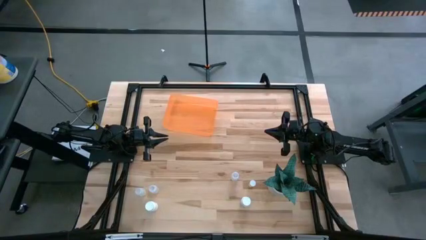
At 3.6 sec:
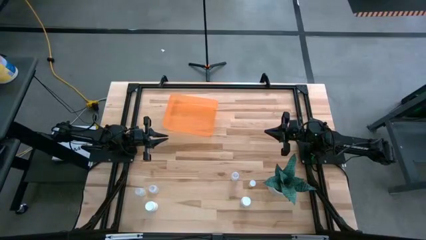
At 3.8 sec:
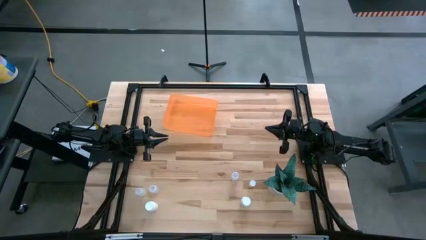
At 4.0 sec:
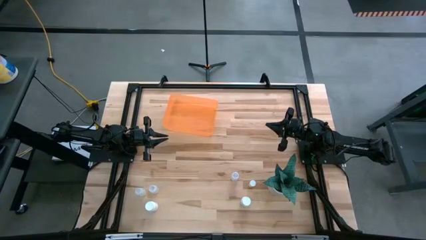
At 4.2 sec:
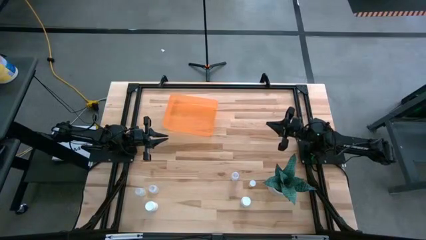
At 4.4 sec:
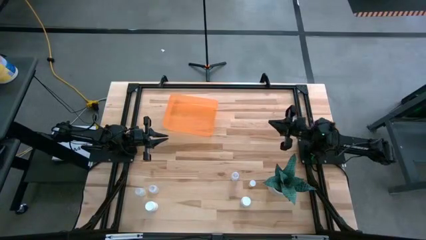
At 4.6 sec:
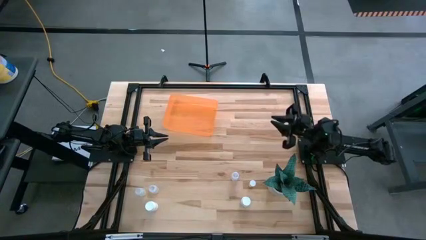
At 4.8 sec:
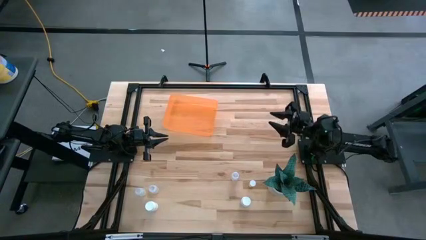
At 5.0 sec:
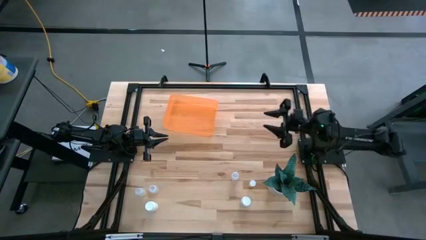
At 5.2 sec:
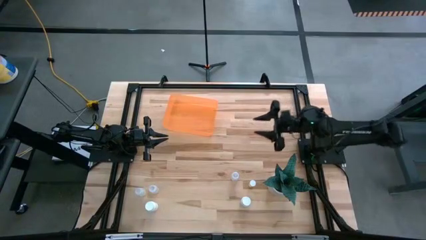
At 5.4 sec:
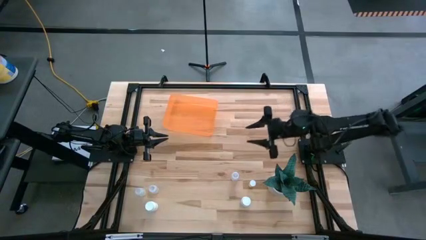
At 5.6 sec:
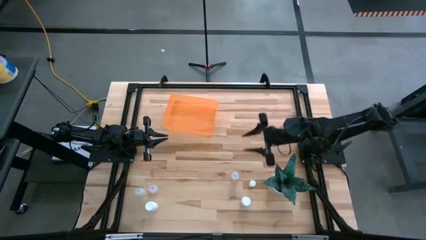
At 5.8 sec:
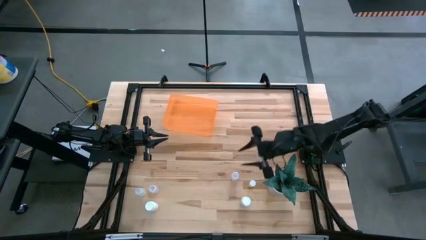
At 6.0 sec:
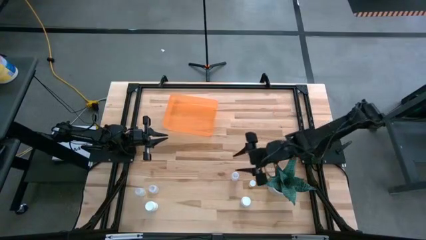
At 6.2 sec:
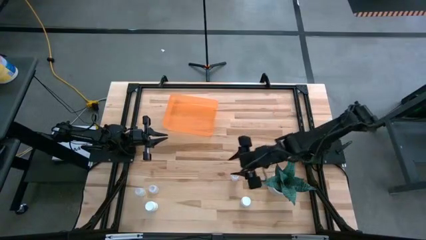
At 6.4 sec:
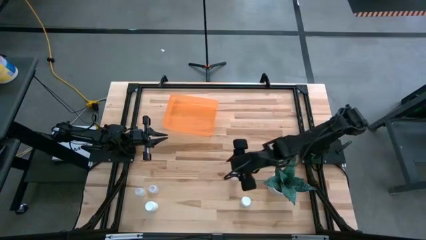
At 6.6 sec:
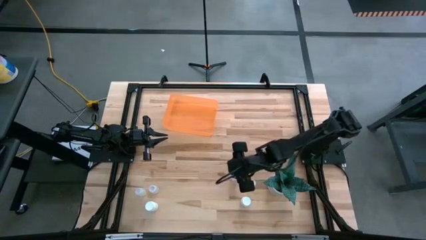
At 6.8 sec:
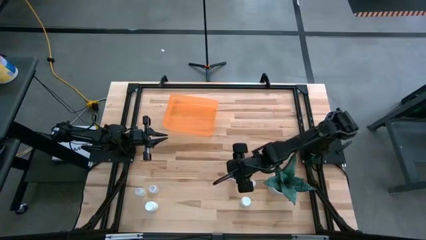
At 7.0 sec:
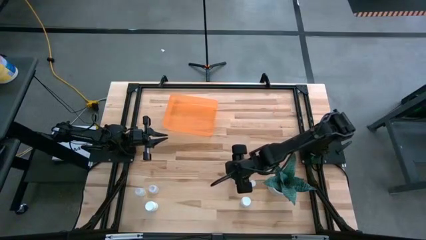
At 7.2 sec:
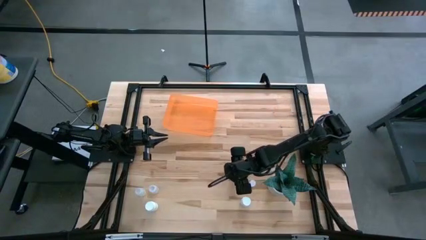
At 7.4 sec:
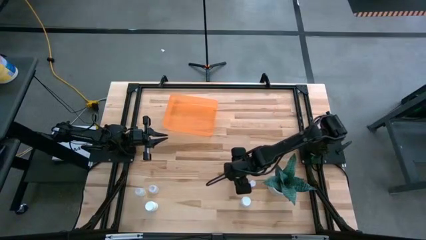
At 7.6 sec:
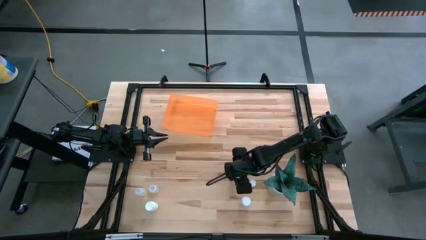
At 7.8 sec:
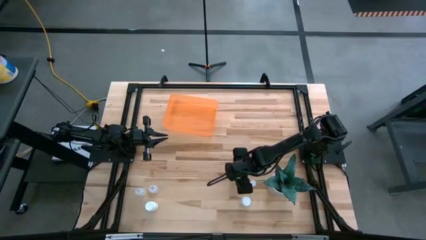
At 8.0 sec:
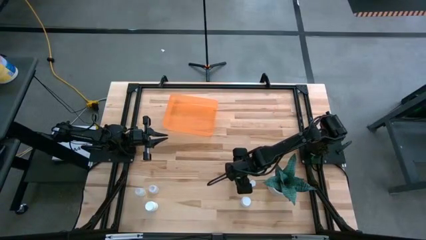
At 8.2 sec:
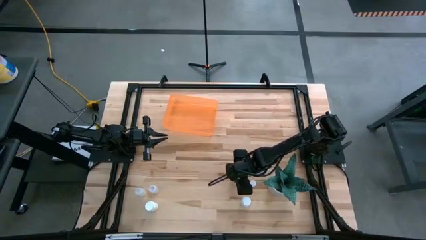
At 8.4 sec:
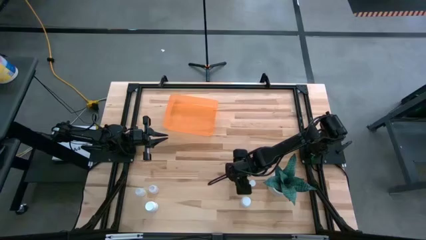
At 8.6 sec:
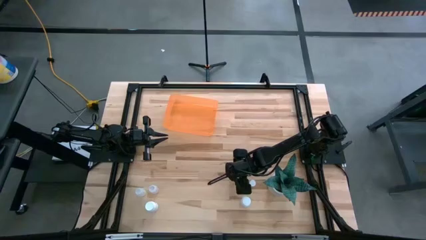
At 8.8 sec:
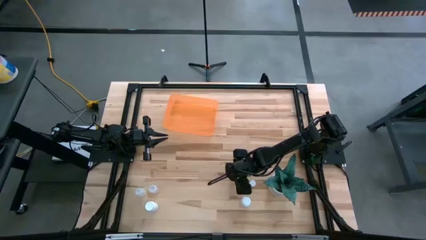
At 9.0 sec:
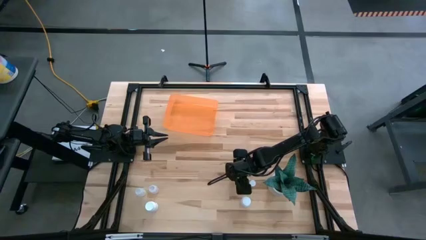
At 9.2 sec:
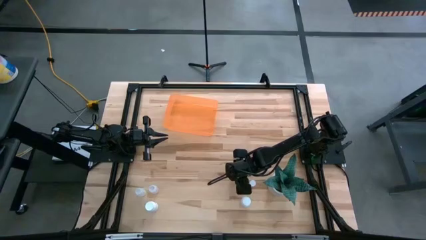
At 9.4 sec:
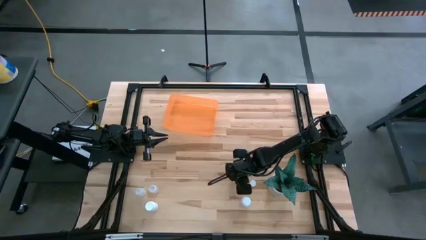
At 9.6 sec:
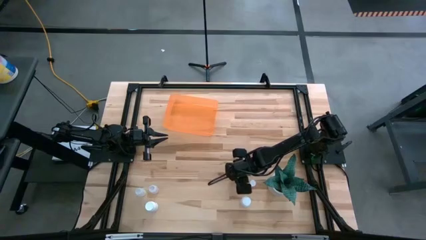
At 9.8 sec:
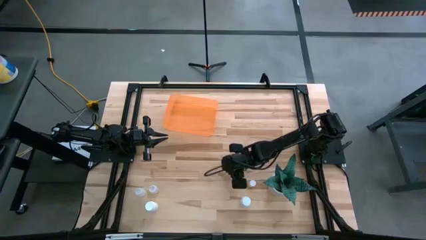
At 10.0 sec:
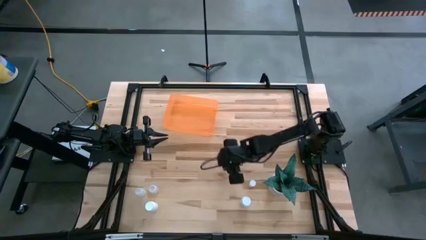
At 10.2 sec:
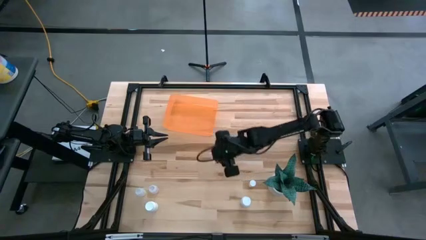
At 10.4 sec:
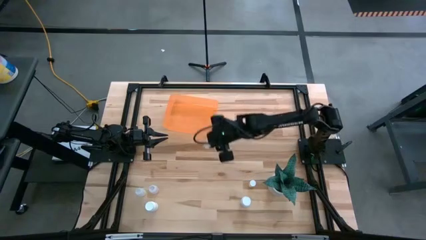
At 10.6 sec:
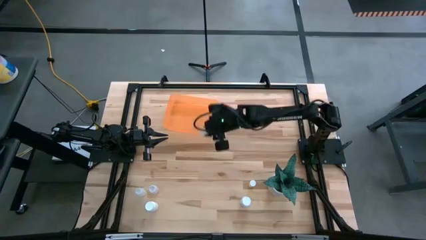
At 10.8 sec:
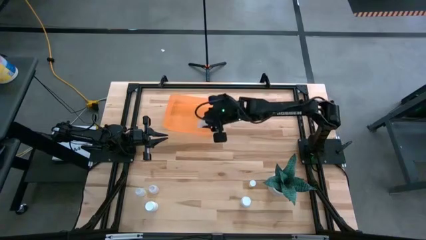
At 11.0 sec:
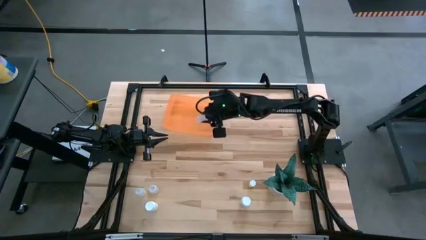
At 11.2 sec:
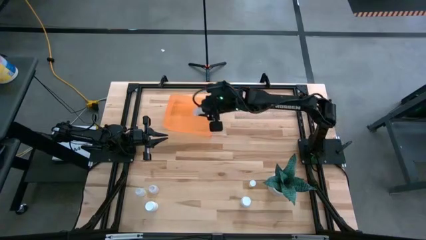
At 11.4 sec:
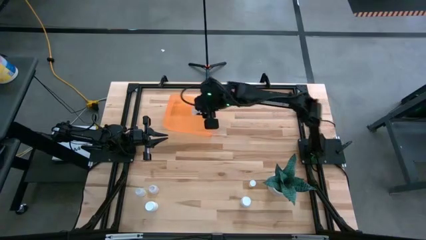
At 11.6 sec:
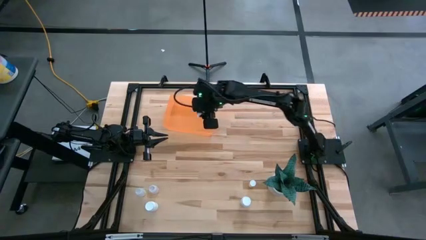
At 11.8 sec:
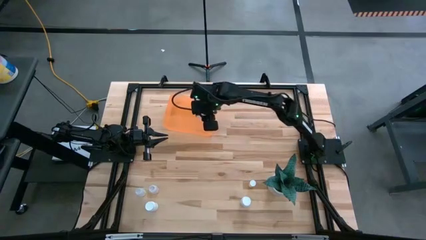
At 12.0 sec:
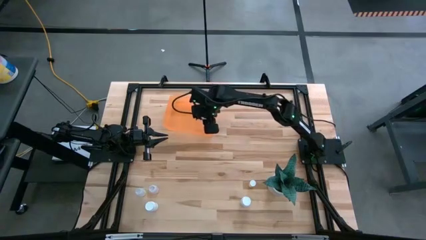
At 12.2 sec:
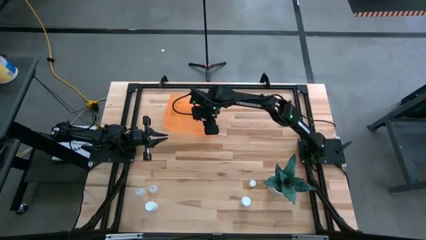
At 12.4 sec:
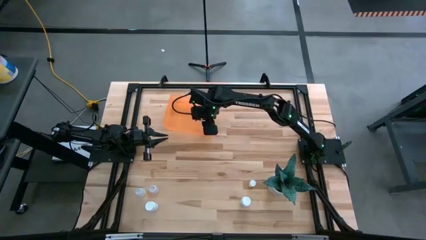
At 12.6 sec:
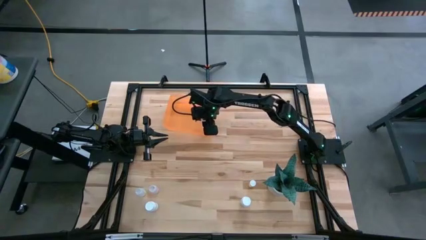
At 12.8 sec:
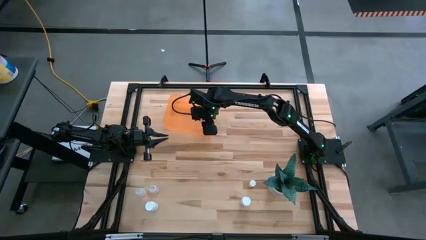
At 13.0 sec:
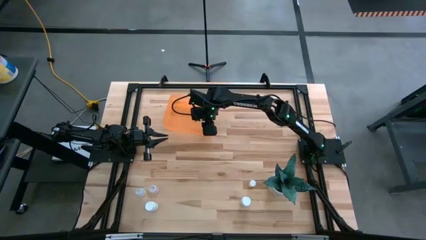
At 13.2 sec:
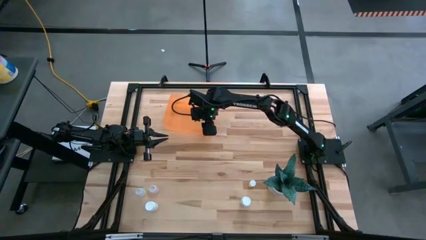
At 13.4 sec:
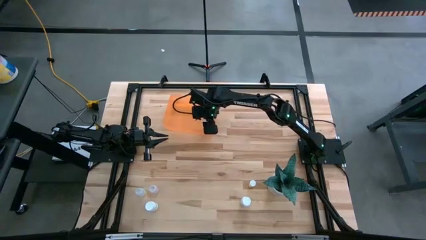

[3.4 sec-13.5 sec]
Task: Pick and place pill bottles into a basket
Put the right transparent pill bottle into the orange bin

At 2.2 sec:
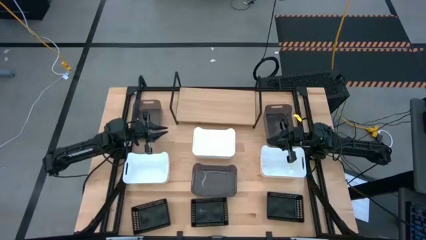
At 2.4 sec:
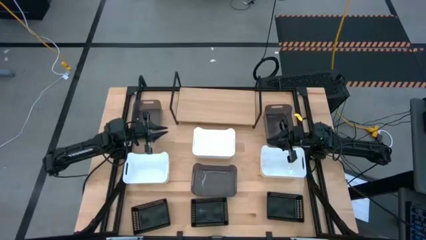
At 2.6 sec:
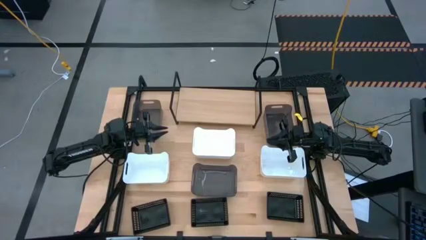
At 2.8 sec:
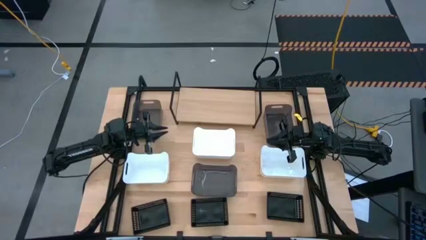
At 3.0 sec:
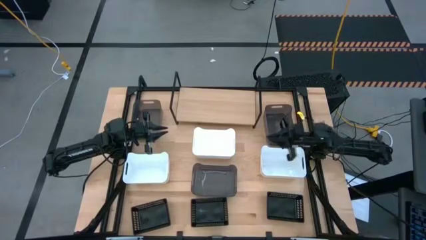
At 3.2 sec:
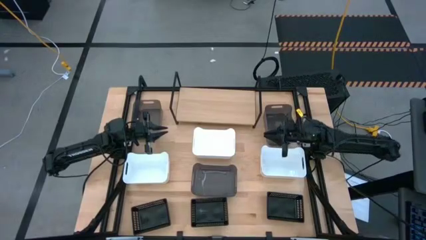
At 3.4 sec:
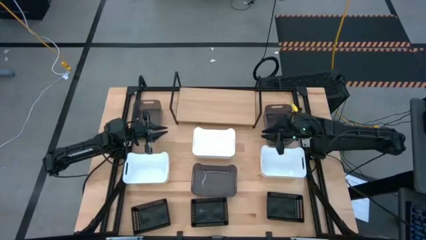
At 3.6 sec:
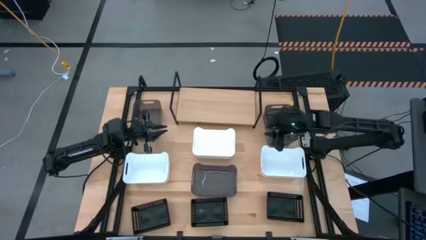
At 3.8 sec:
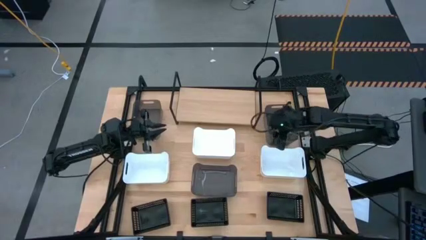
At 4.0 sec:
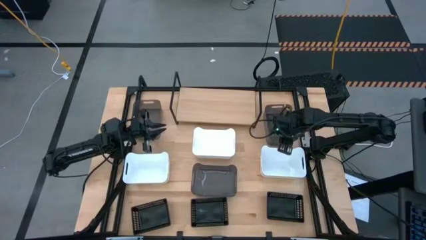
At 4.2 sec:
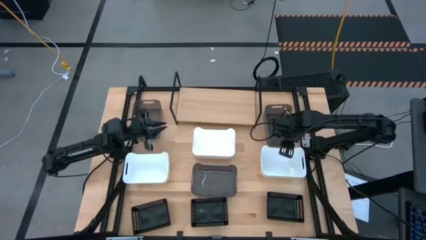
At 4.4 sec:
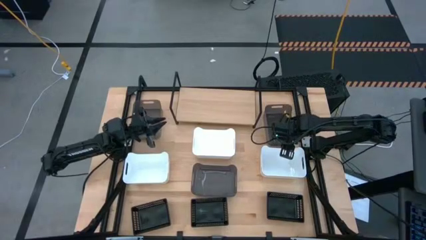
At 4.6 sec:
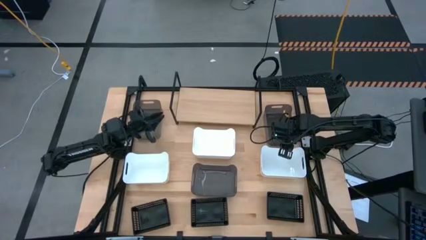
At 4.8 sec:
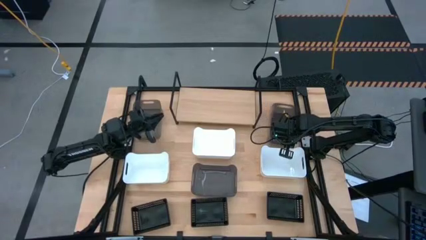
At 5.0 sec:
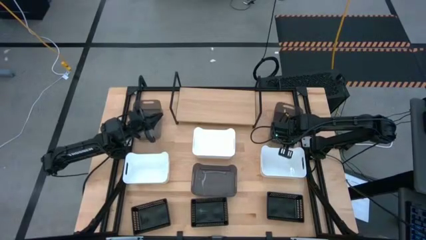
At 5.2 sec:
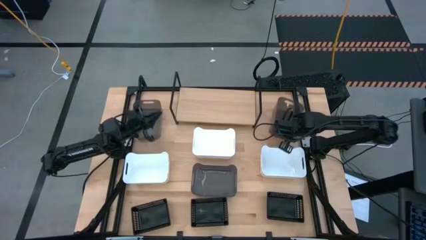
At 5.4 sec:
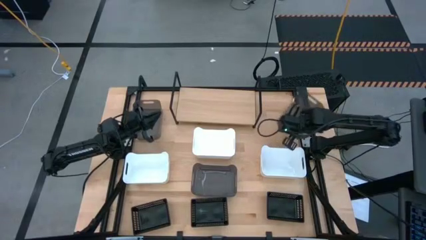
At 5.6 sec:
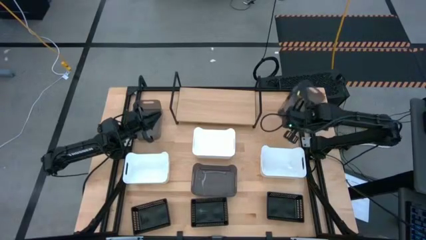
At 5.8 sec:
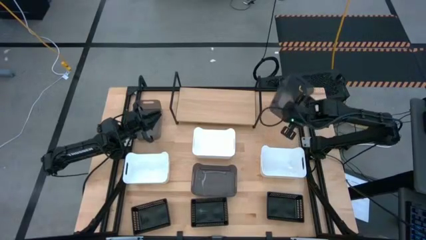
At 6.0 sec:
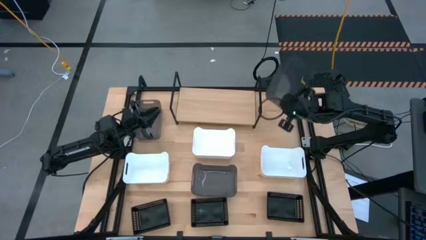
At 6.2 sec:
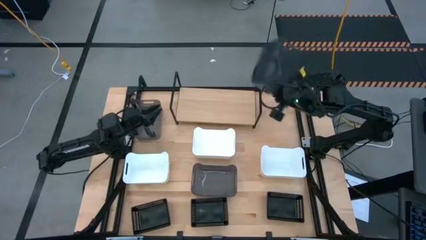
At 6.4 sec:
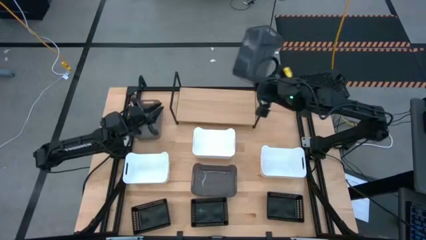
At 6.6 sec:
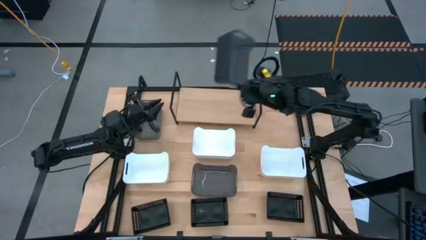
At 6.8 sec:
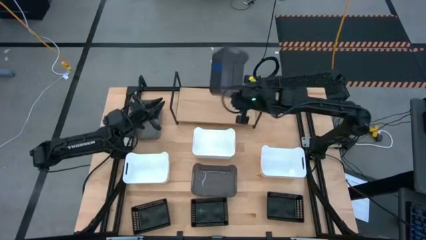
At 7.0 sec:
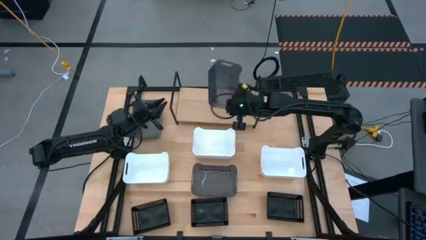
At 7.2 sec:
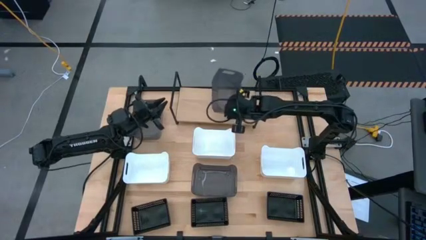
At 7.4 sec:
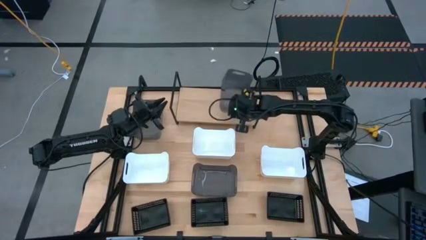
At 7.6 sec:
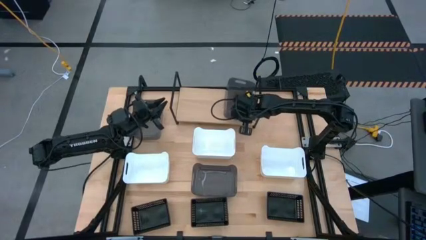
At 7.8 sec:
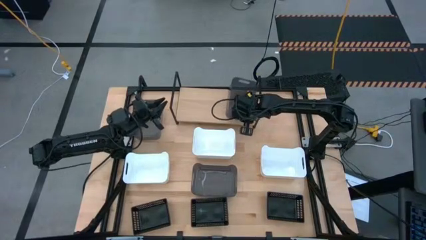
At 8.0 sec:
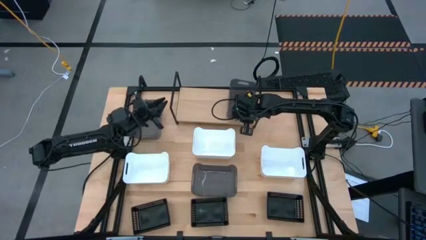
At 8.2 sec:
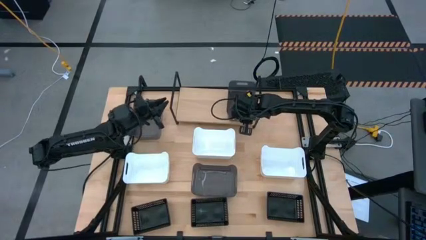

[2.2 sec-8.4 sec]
Task: Stack baskets on shelf by color
Put the top right gray bin on the shelf
